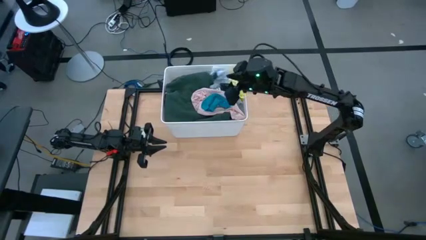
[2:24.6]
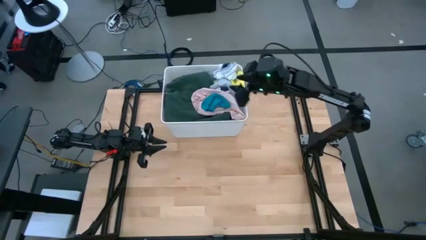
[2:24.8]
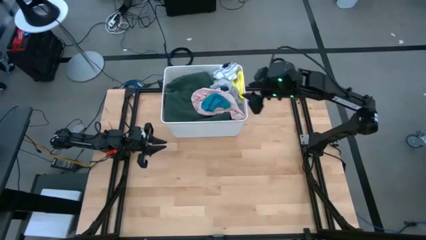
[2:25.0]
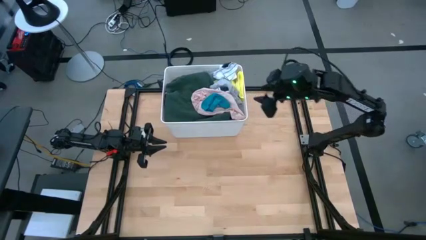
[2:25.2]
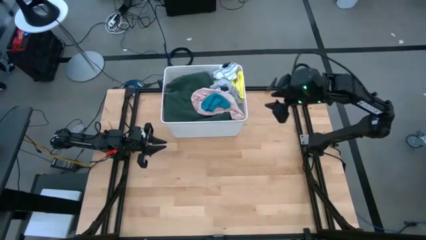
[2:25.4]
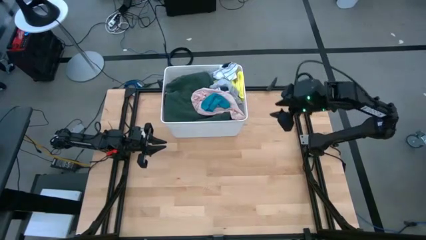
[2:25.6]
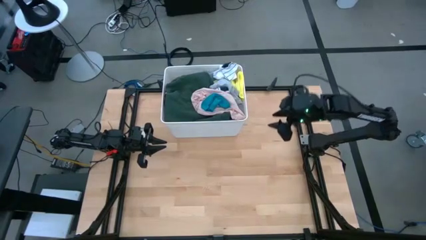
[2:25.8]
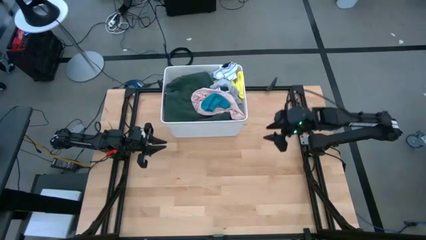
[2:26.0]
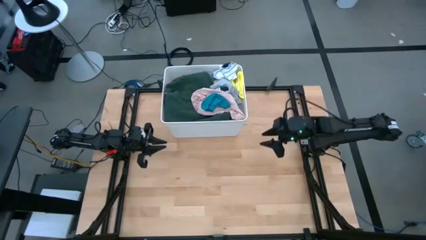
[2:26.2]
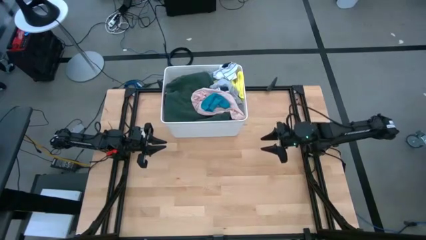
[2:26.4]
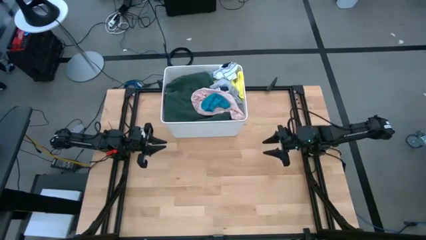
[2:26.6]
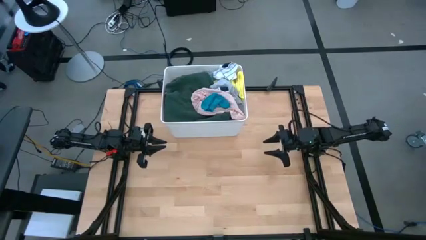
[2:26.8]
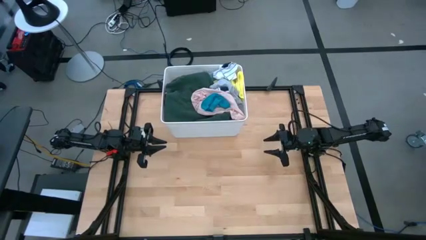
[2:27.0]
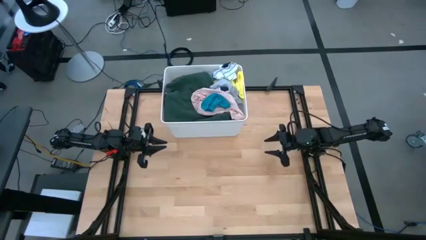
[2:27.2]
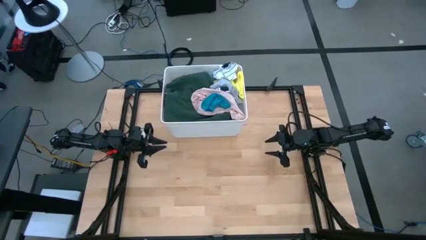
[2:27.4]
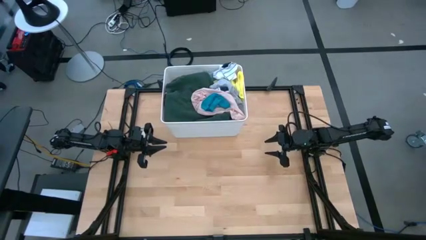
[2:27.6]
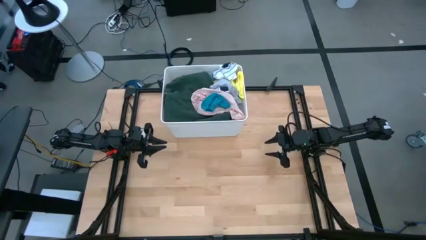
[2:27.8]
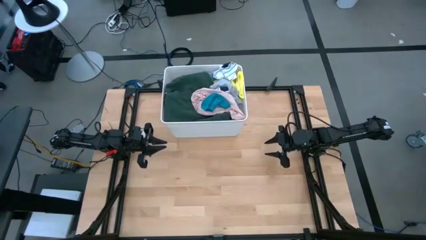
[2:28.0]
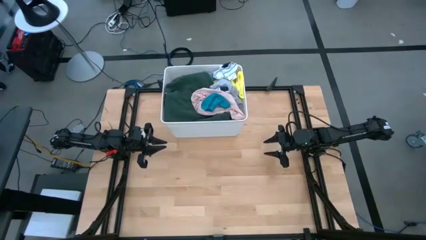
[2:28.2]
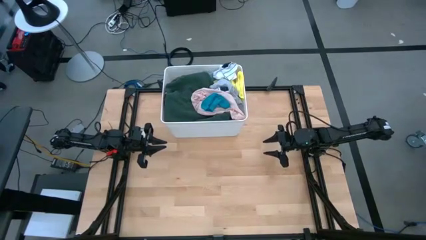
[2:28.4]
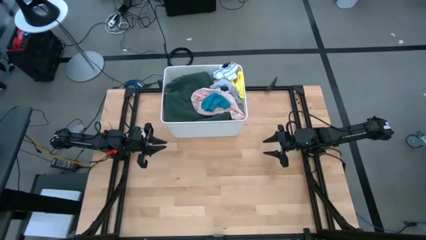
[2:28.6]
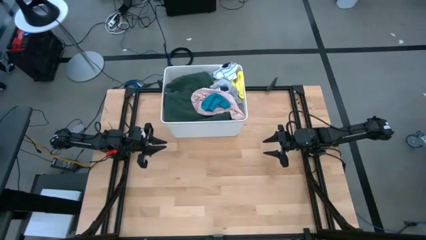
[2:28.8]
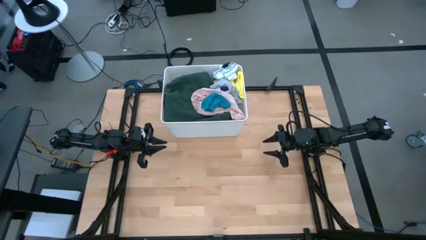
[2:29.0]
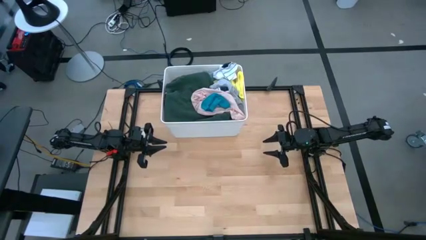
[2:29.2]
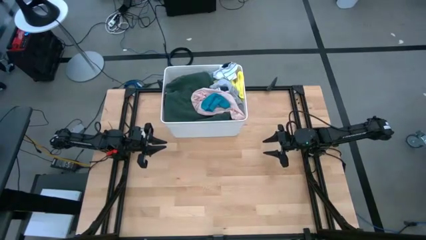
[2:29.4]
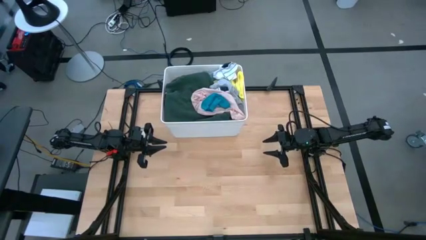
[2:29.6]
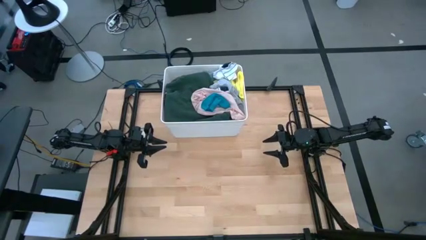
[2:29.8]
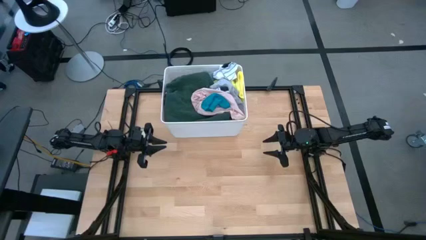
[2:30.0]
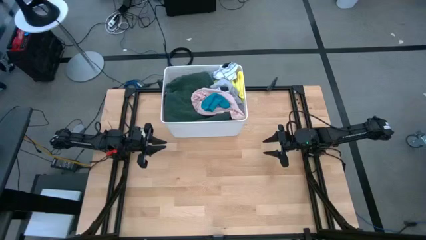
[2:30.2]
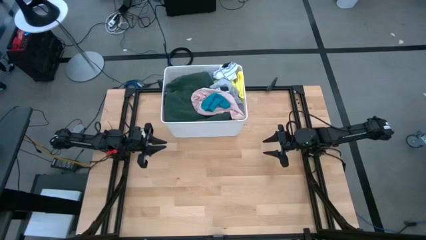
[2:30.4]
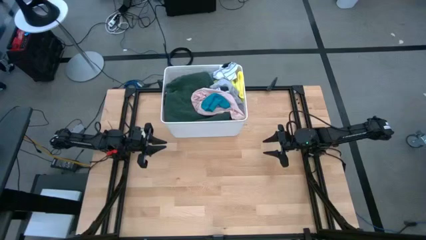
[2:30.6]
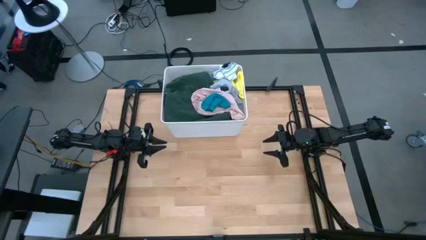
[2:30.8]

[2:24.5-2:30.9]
Task: Sort clothes
Return to Home Position

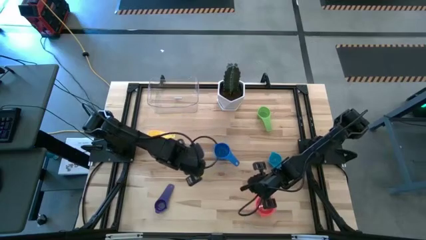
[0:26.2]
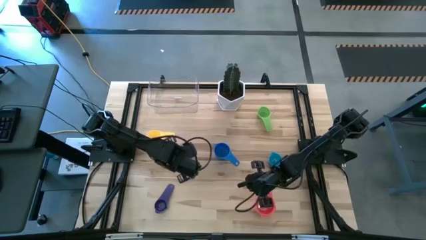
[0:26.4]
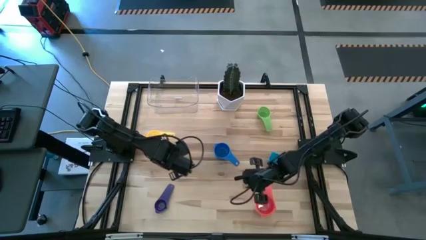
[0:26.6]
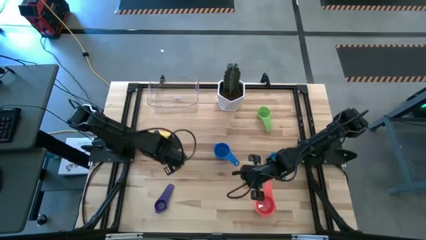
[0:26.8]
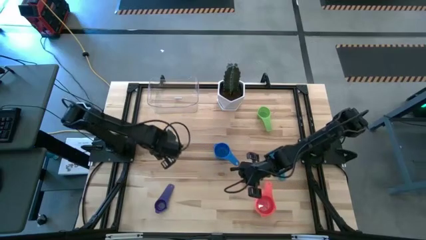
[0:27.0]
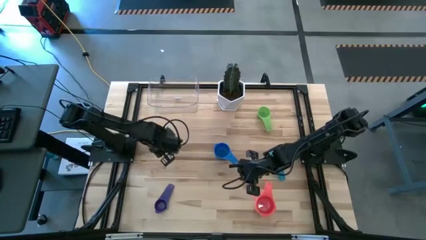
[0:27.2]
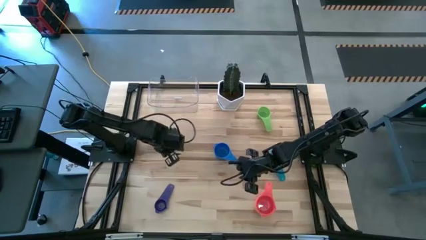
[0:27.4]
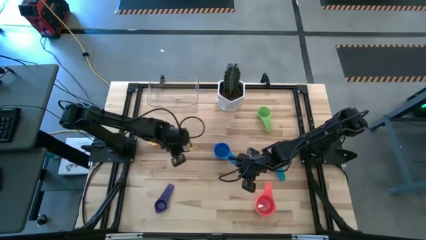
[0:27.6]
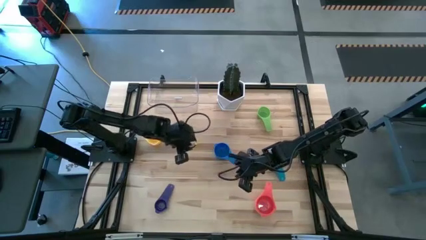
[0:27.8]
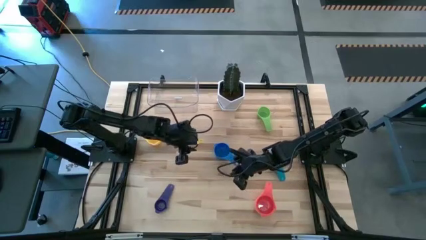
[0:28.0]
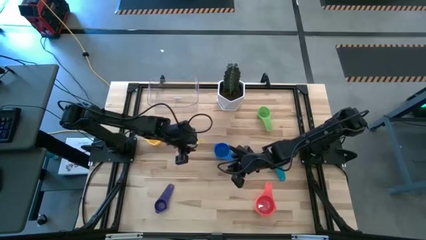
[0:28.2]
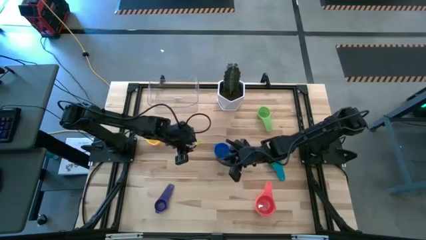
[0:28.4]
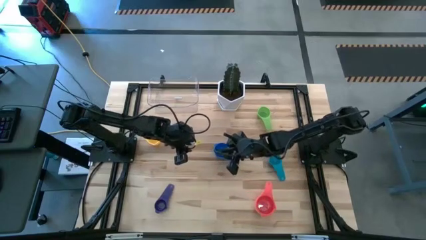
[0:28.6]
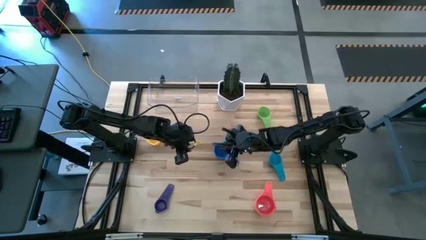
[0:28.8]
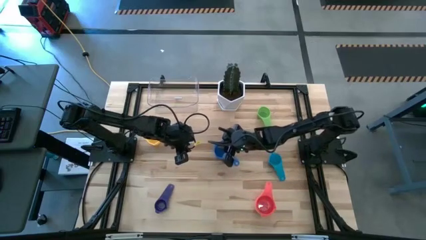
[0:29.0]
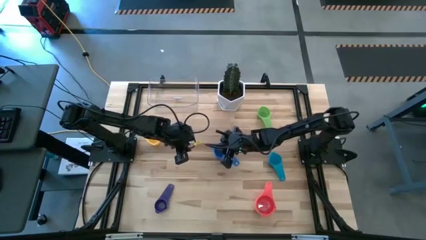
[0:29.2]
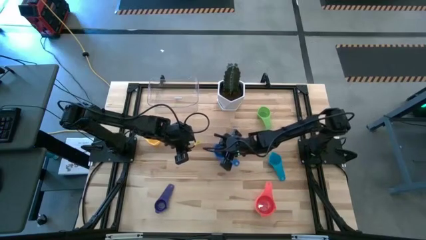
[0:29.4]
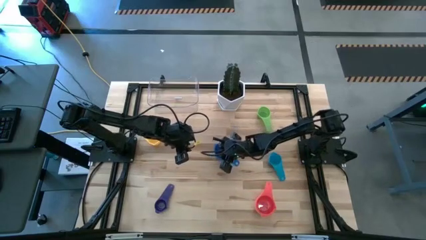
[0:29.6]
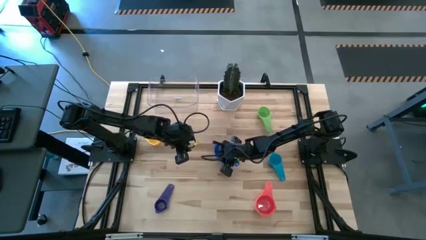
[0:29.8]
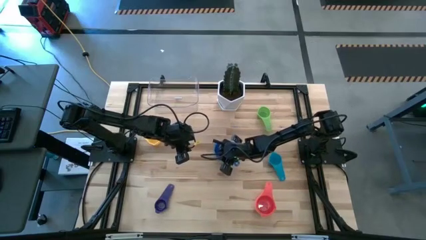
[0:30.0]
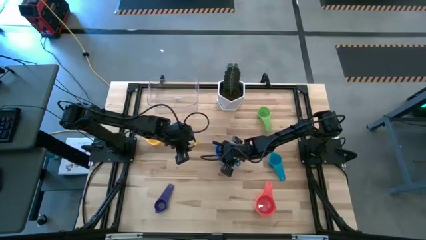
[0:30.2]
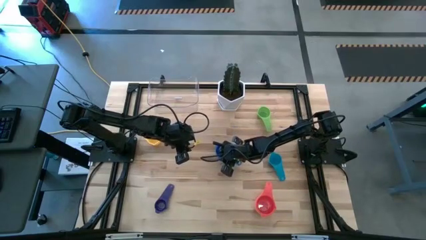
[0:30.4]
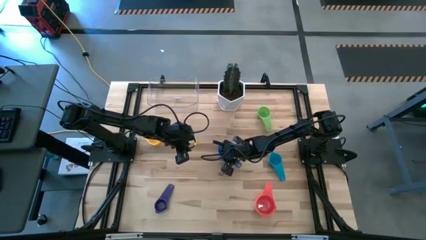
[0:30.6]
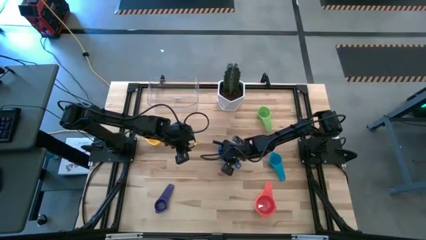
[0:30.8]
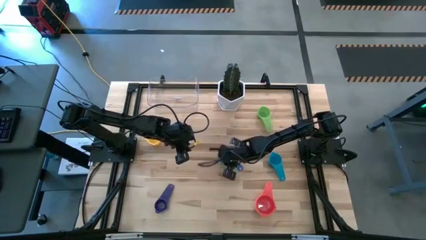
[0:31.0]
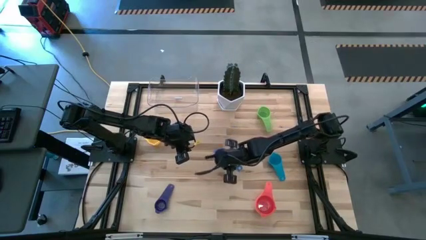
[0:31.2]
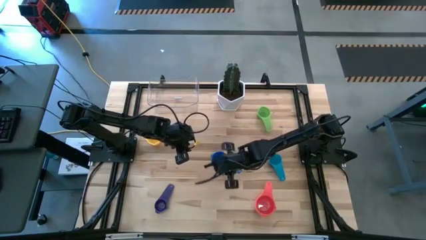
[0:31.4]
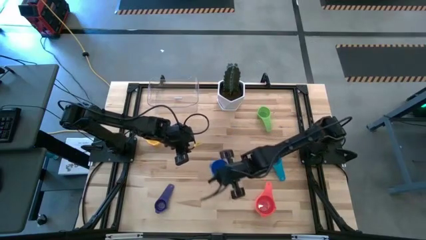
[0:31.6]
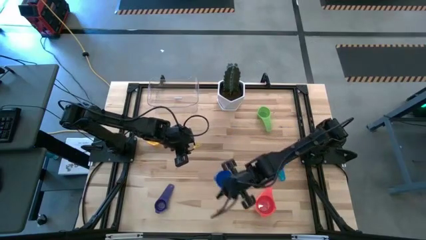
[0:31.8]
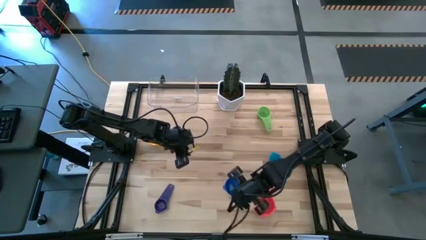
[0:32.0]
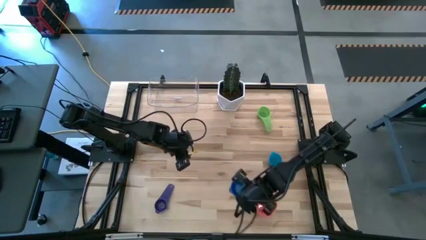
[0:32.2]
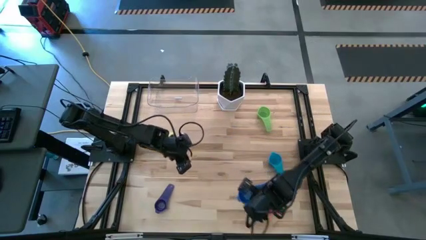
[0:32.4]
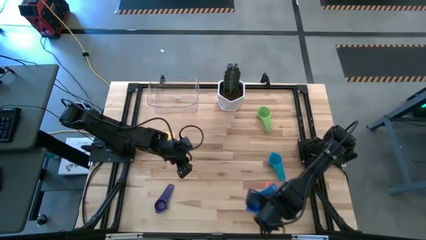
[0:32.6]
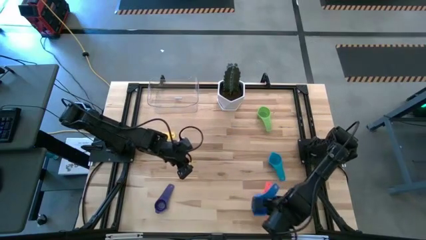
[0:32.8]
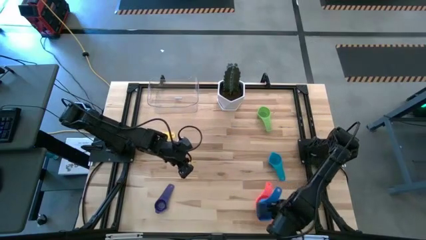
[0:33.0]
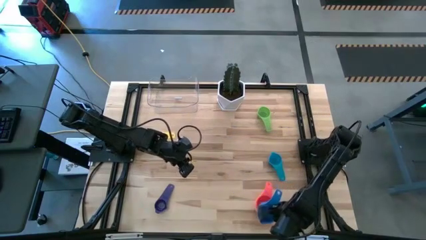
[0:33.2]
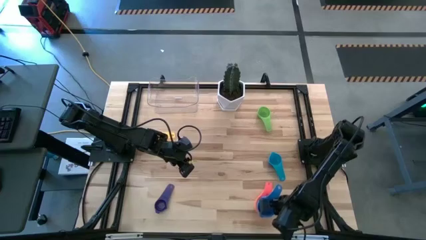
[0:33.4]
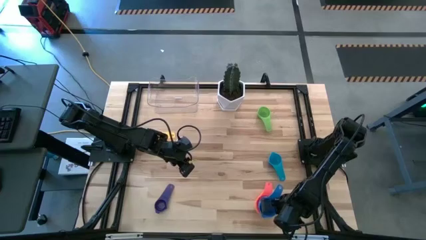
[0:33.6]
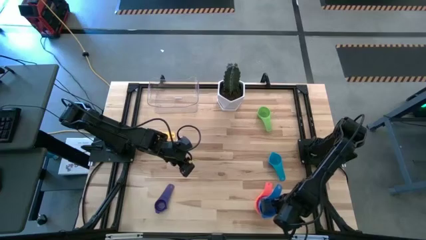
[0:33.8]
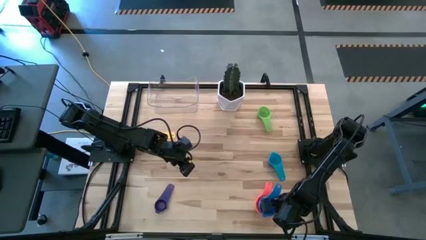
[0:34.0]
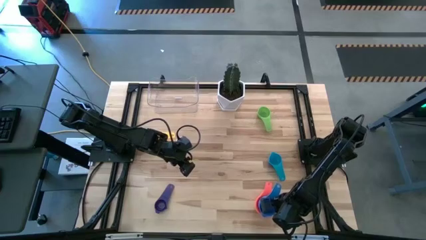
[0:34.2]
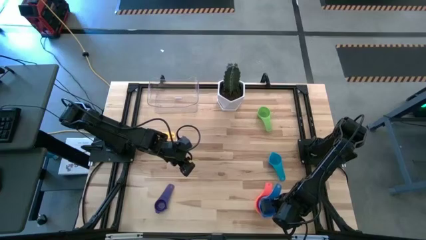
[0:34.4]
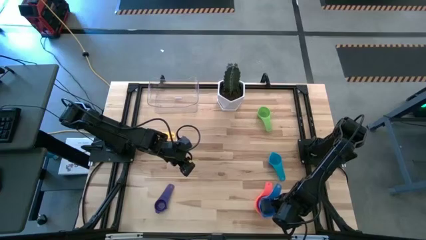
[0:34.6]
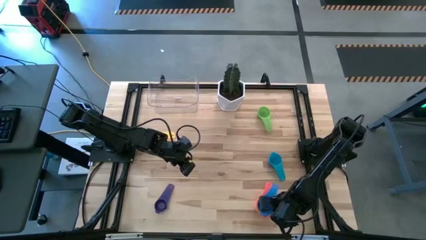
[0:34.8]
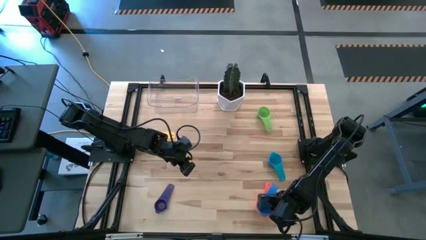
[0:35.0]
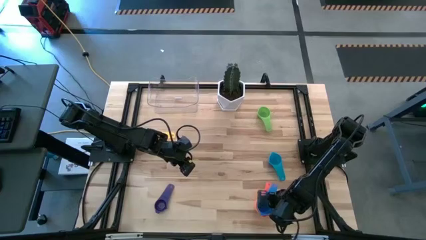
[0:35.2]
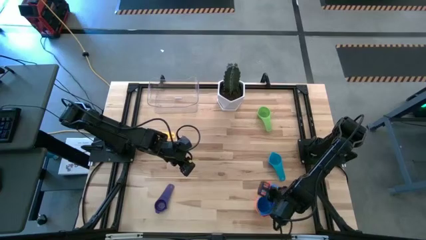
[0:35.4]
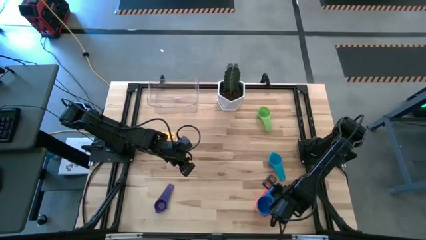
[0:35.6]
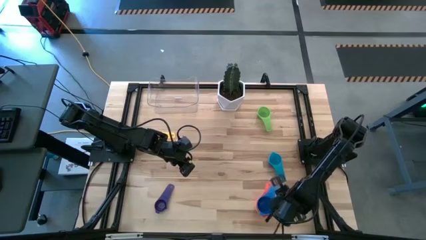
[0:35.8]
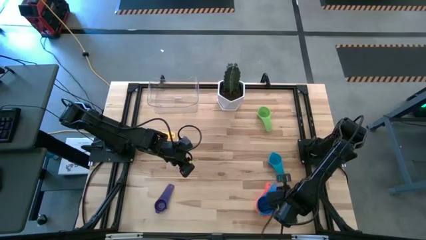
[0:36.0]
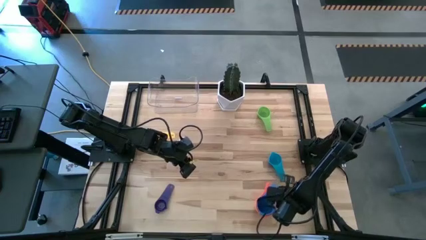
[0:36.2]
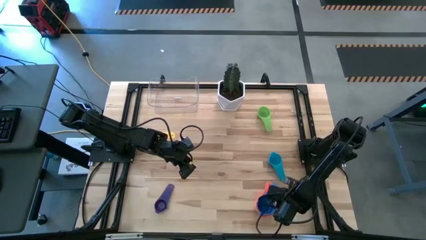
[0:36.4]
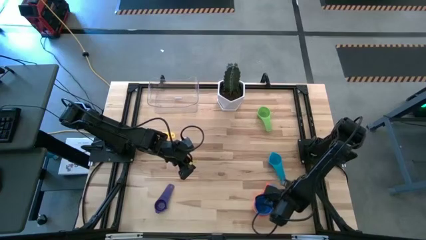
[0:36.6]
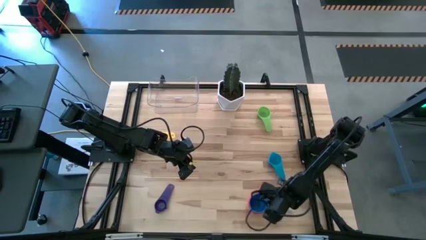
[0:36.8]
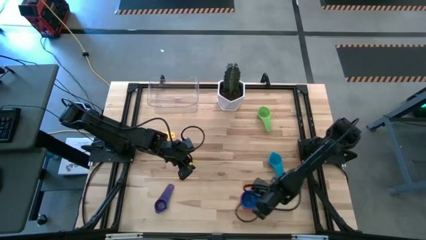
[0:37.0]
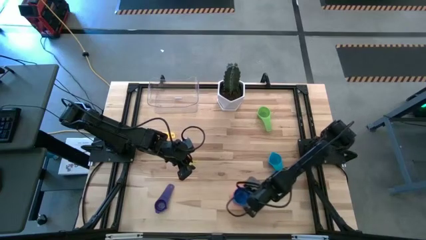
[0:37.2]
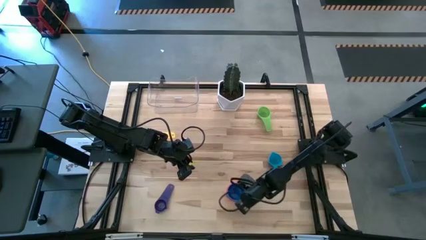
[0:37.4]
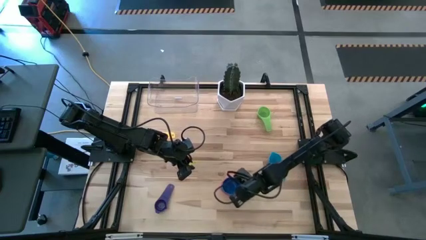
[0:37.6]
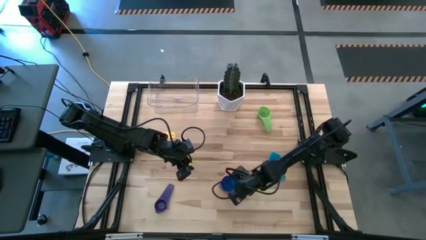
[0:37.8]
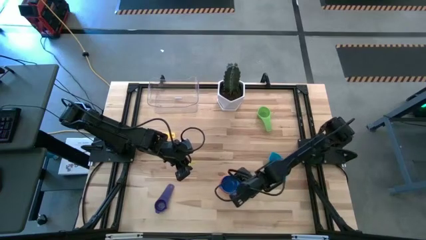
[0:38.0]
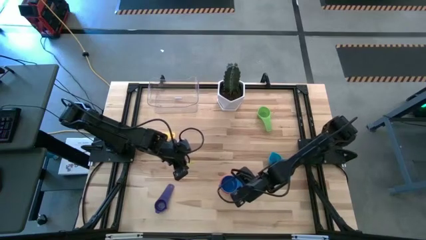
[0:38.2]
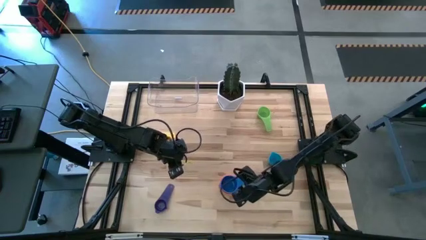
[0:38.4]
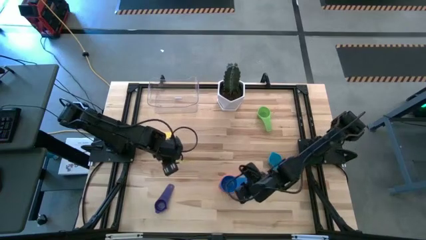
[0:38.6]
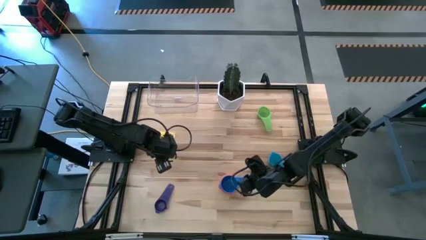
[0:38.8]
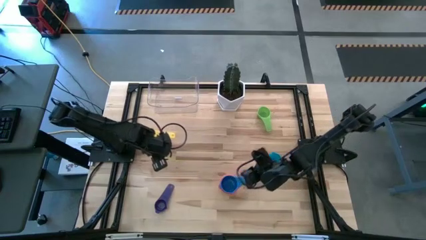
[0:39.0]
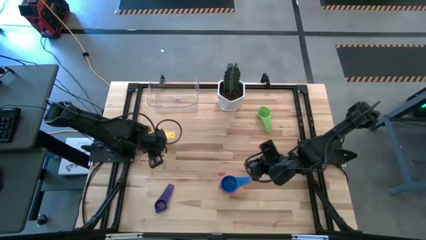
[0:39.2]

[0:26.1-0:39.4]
Task: Nest measuring cups in basket
Stack the large dark blue measuring cup on top of the red measuring cup
